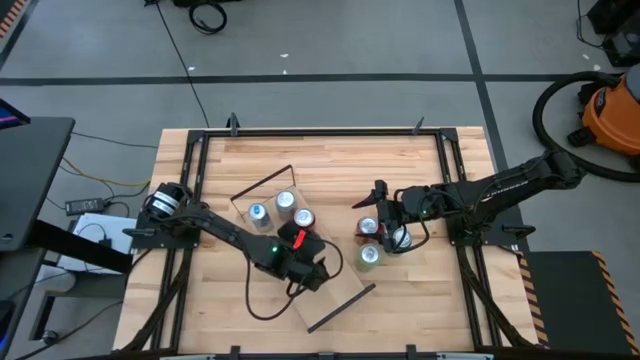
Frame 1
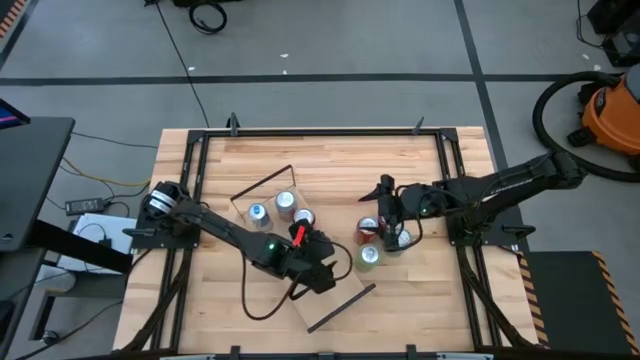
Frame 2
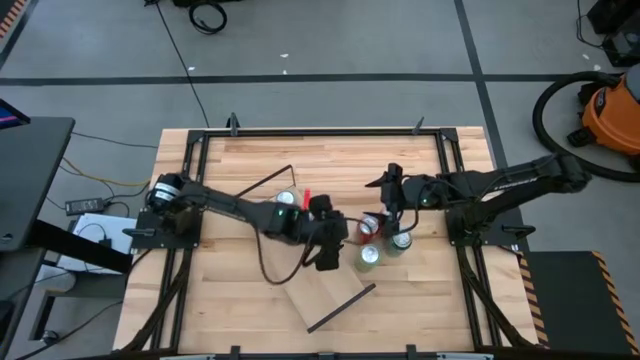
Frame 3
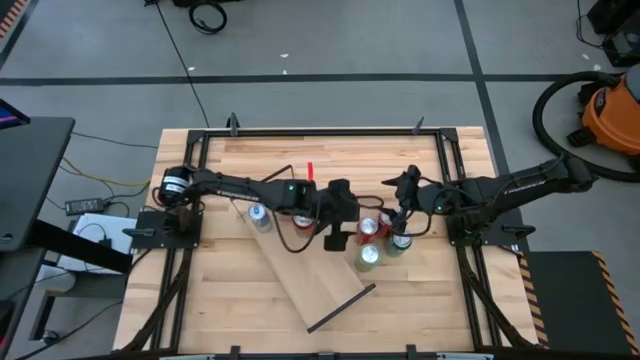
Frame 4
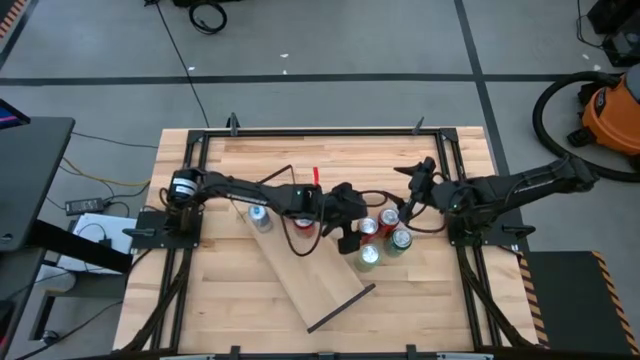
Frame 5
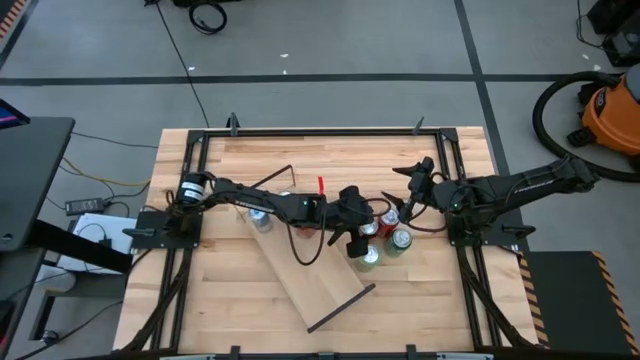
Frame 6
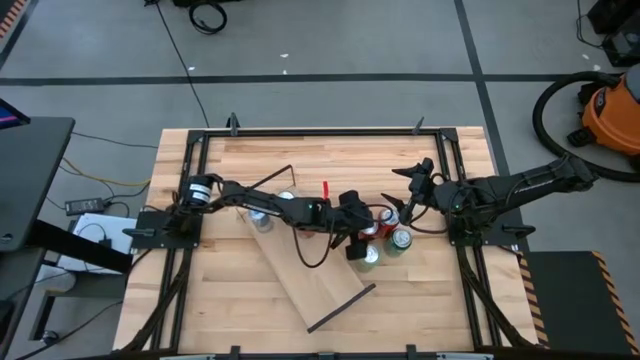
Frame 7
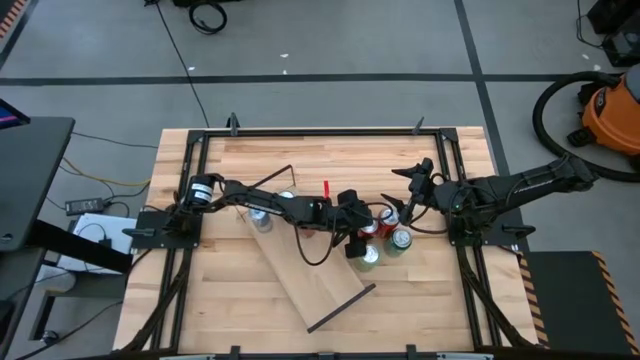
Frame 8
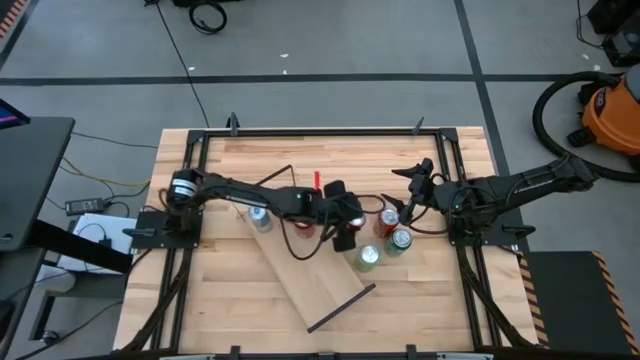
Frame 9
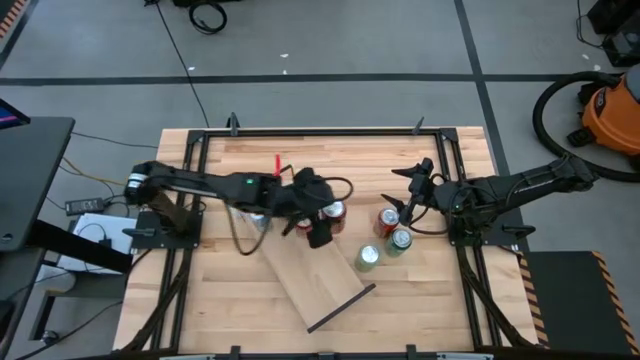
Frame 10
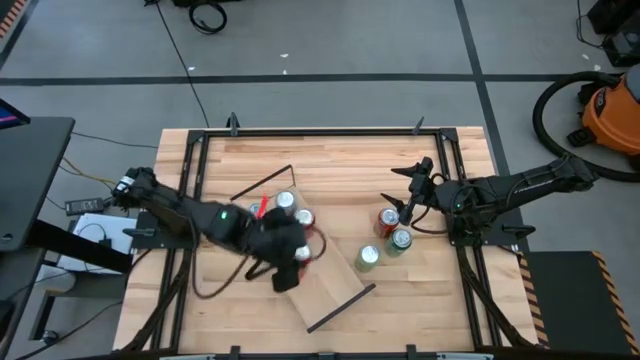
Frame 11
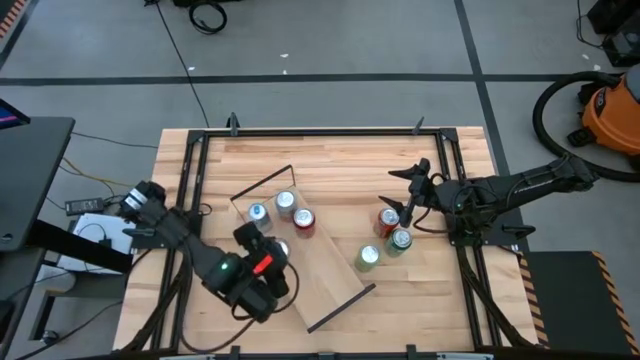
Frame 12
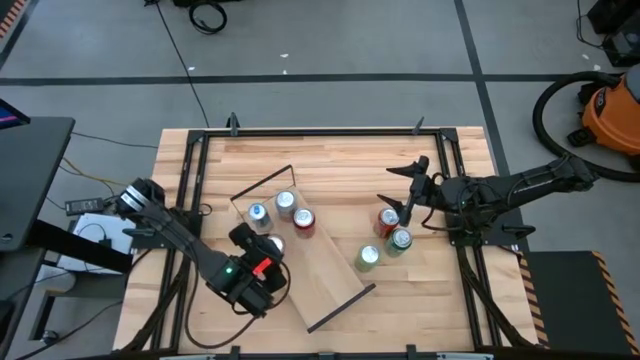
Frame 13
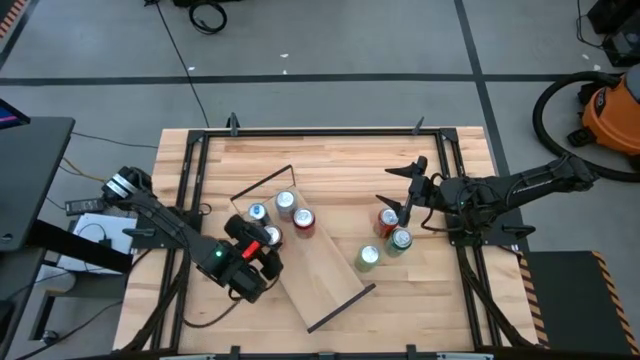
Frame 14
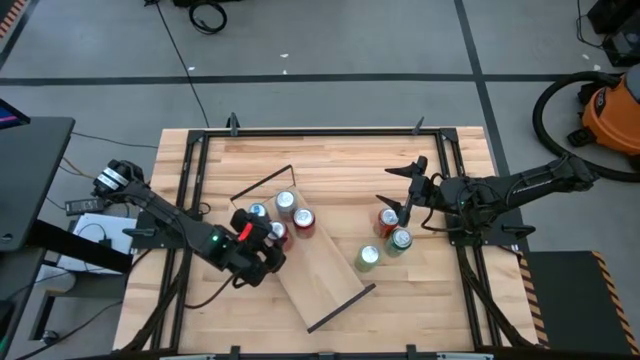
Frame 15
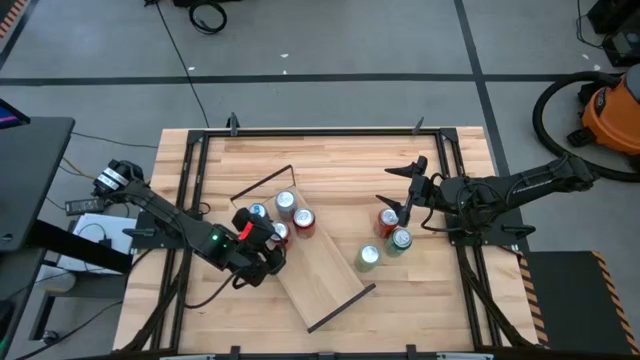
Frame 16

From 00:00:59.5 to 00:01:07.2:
Task: Place canned beverage on shelf
Put the left orange soda can on the shelf

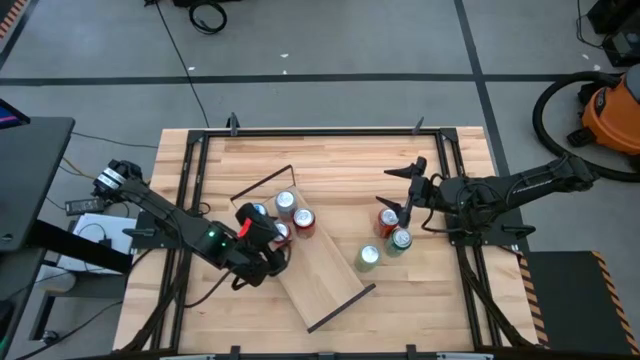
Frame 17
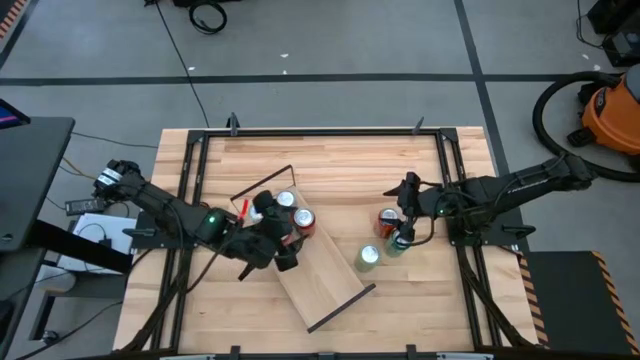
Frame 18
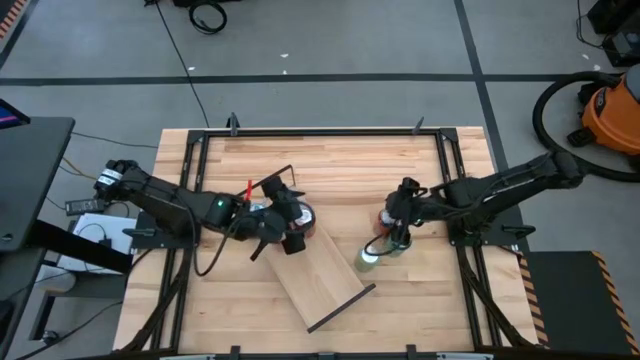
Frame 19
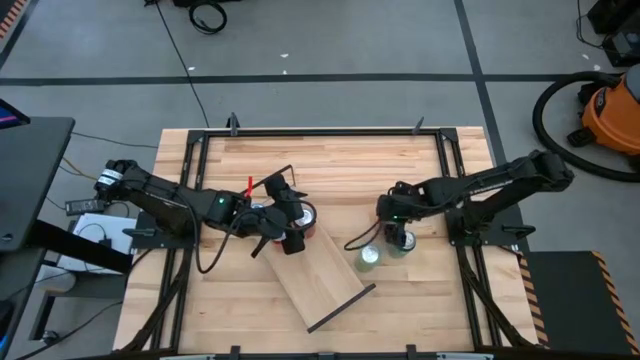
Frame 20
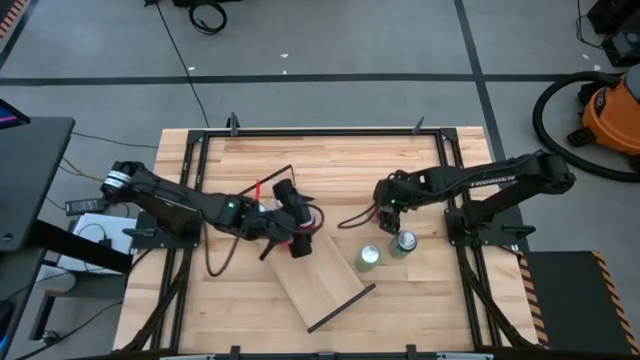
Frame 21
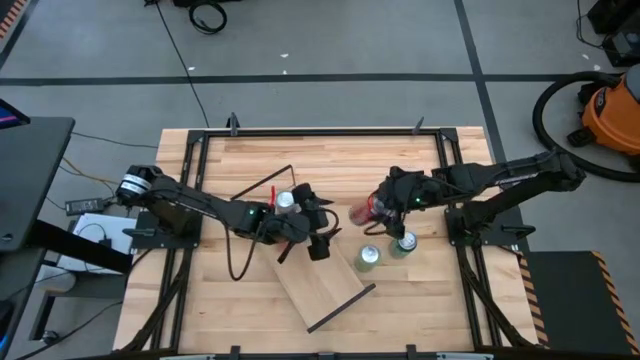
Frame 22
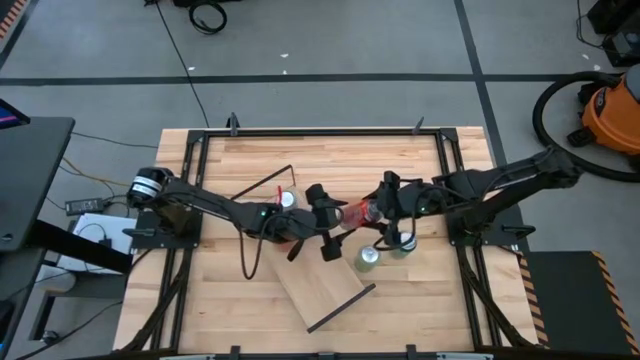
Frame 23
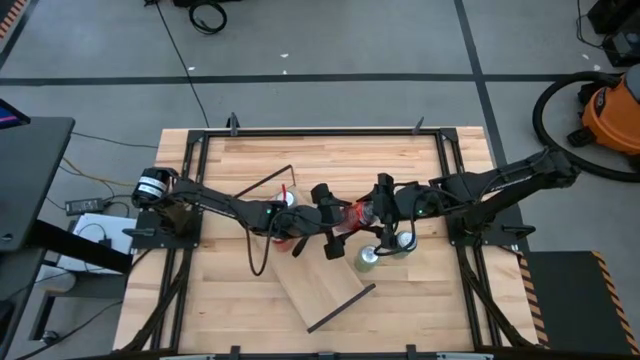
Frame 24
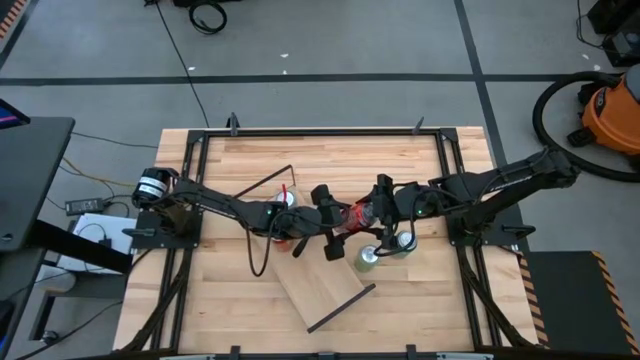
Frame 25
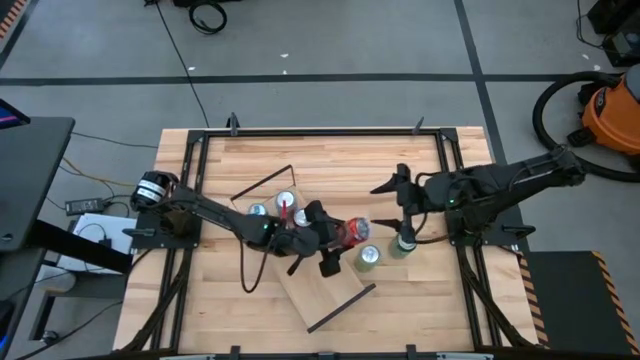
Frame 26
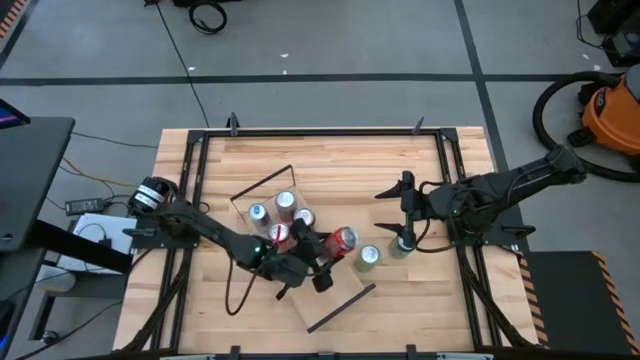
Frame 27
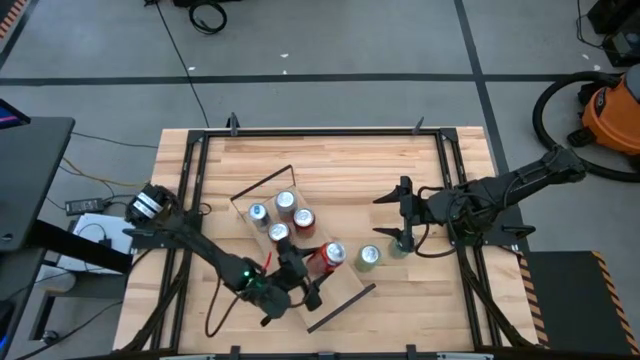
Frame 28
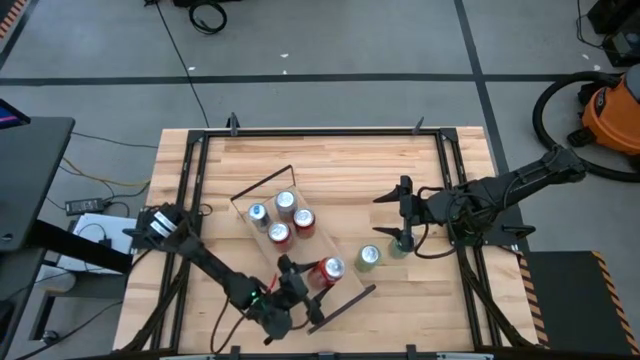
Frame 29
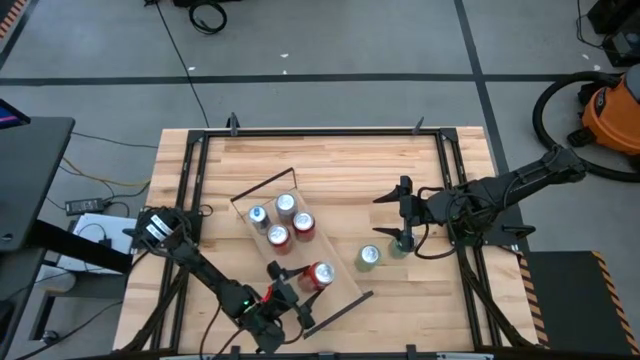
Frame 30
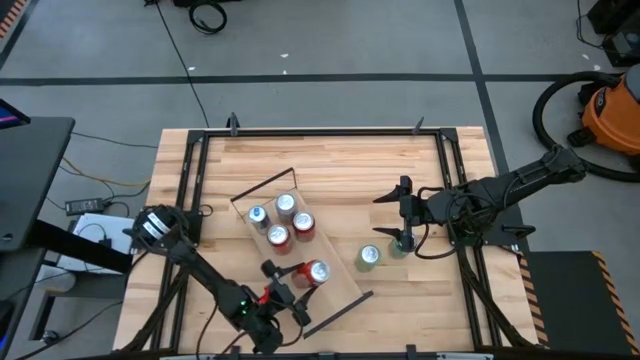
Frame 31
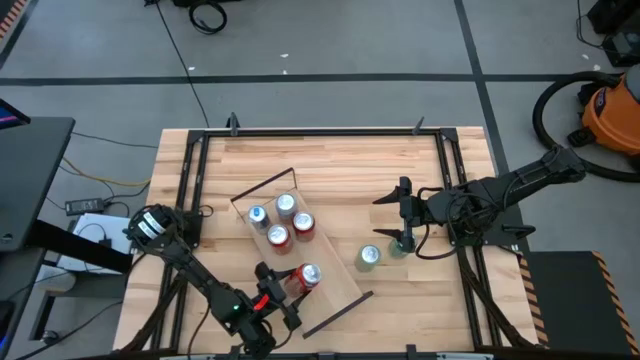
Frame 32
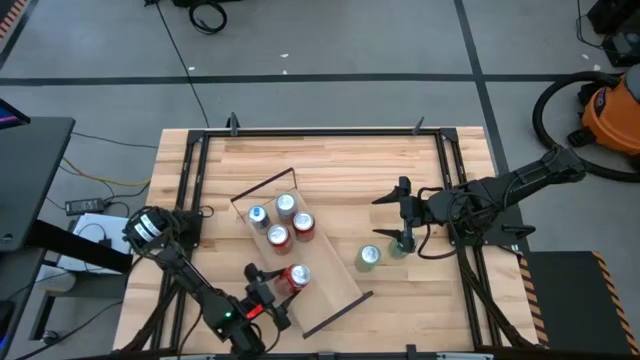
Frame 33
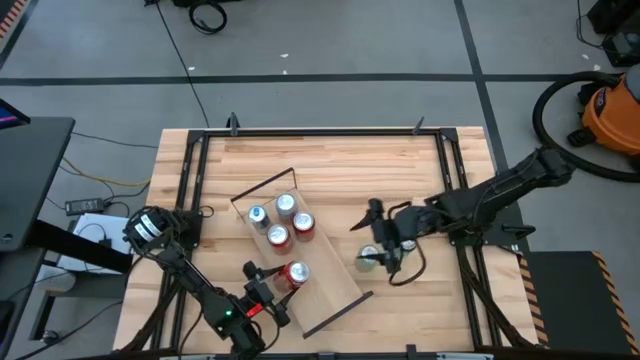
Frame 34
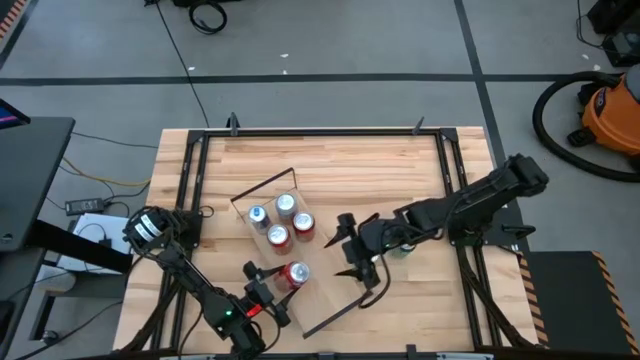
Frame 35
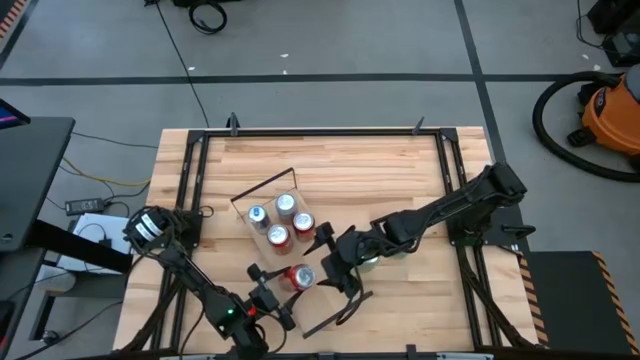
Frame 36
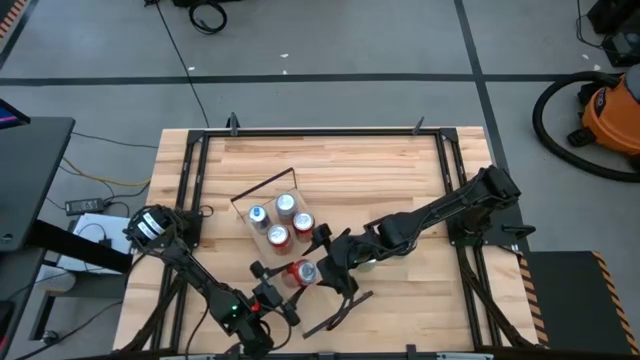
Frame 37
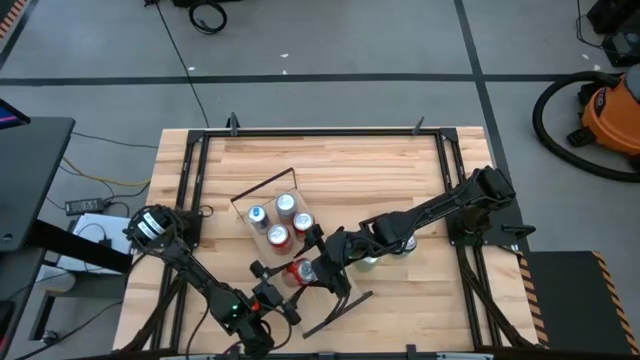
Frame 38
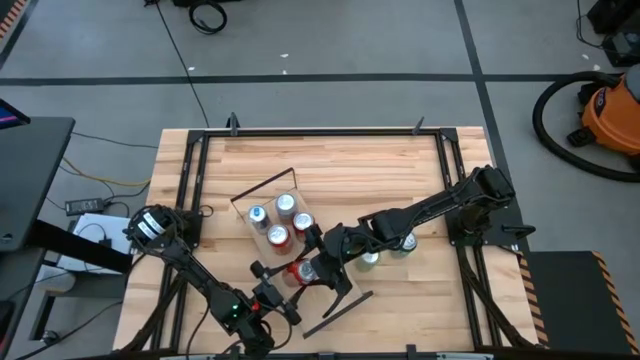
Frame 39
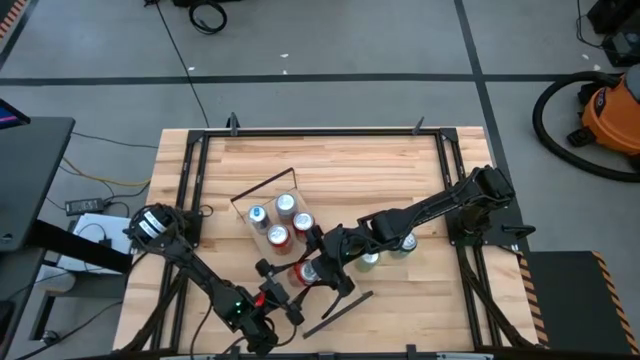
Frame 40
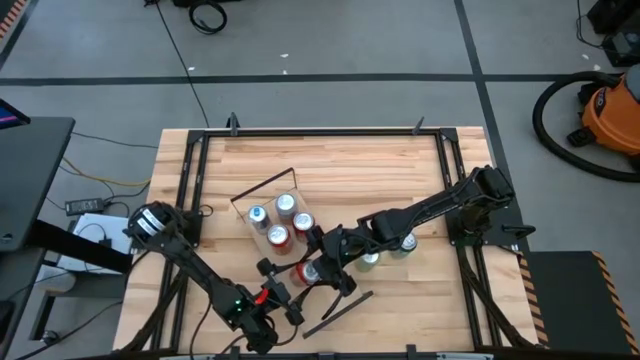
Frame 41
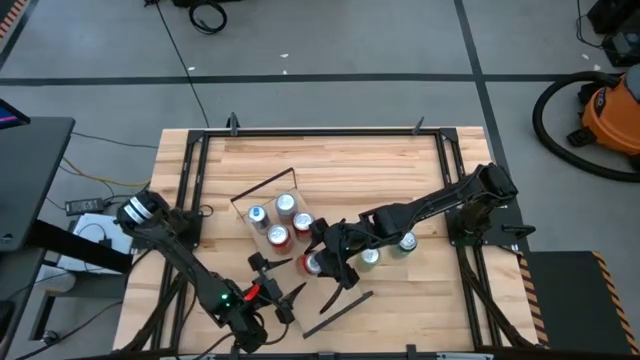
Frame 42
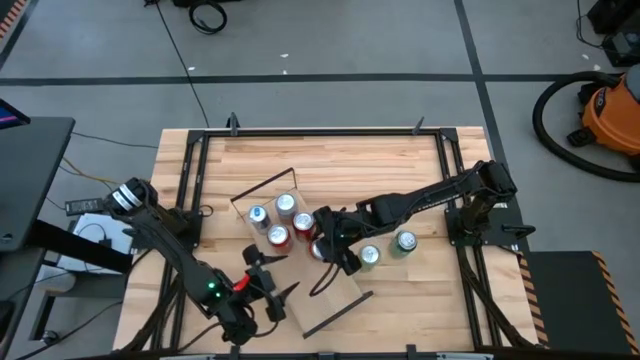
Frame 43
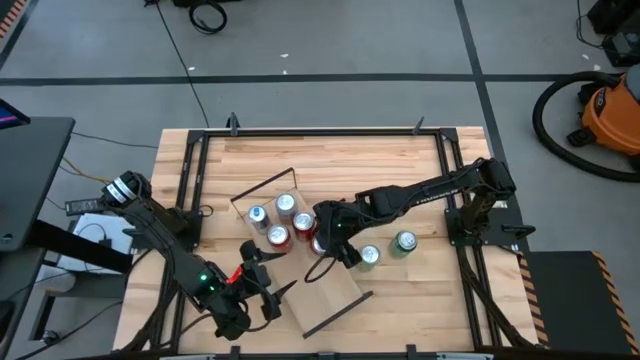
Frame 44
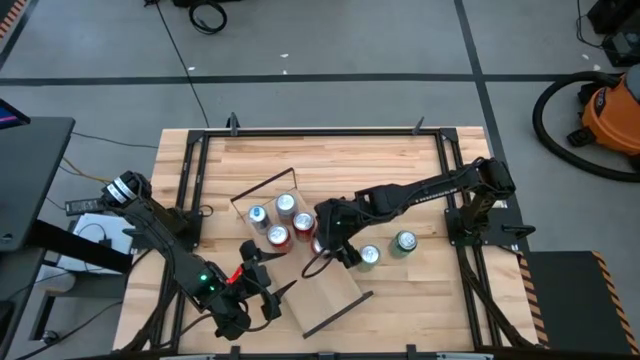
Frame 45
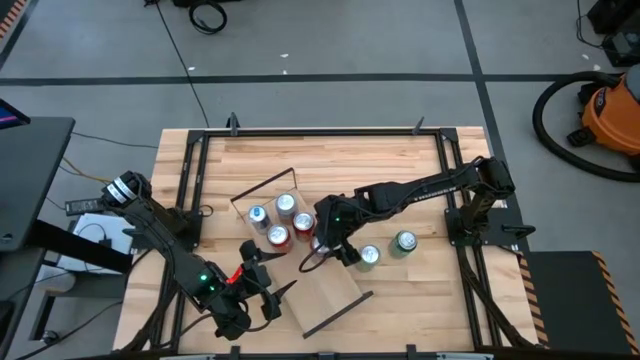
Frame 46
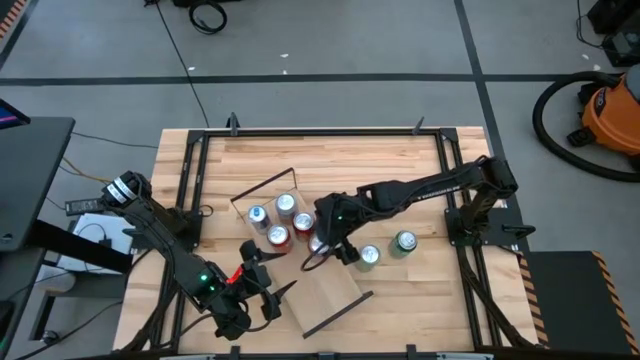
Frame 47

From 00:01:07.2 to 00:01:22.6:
Put the orange soda can on the shelf
